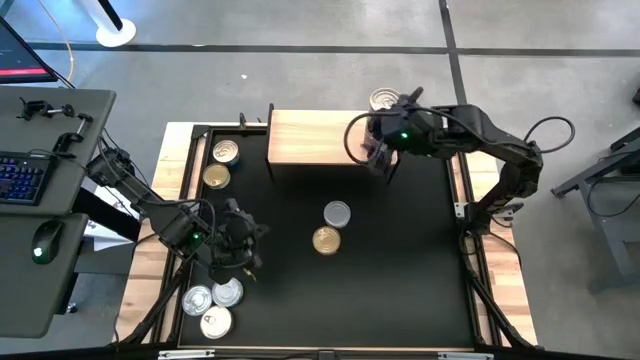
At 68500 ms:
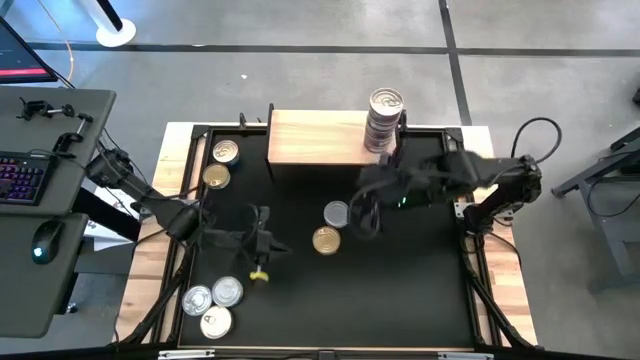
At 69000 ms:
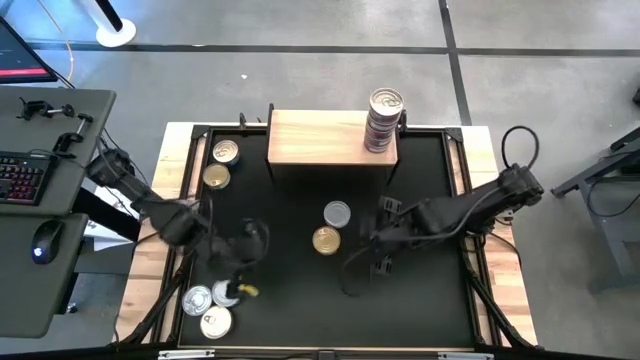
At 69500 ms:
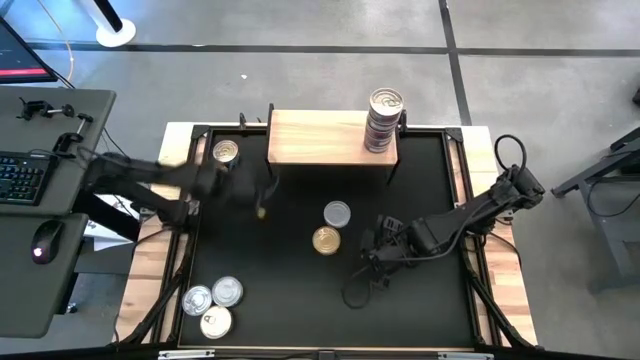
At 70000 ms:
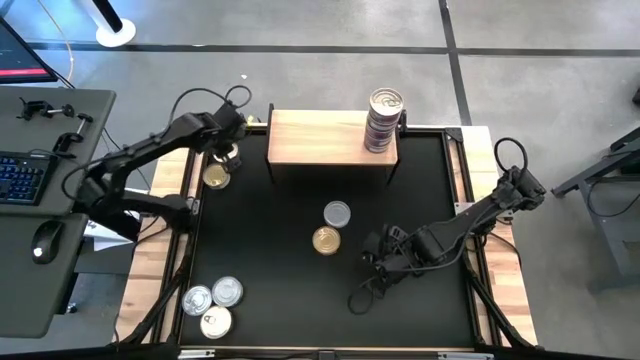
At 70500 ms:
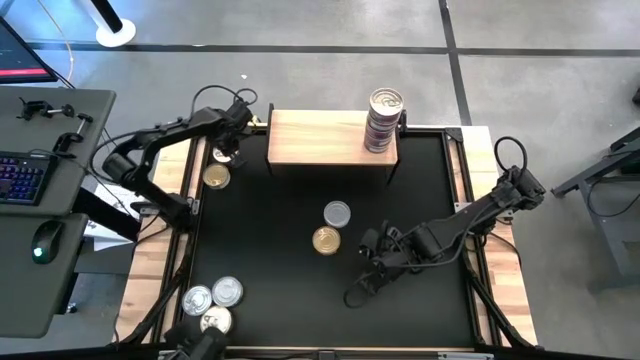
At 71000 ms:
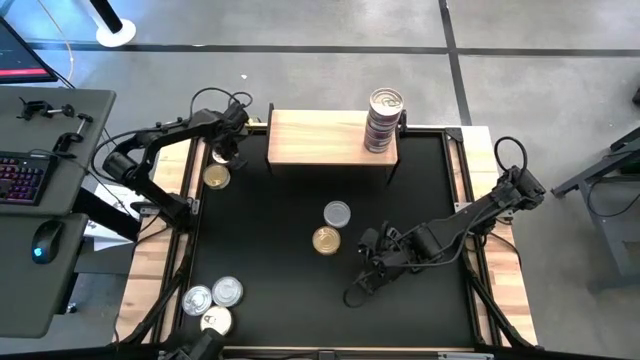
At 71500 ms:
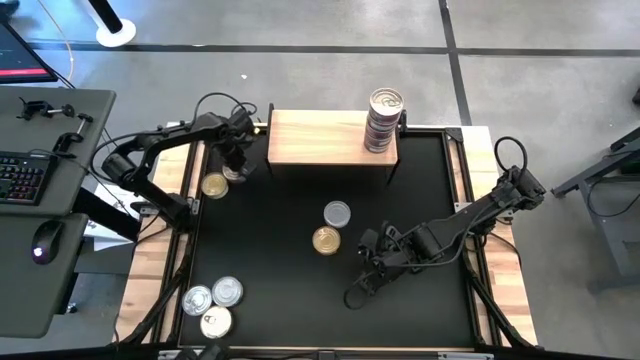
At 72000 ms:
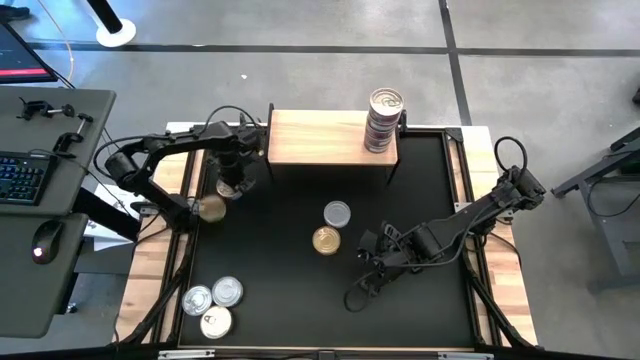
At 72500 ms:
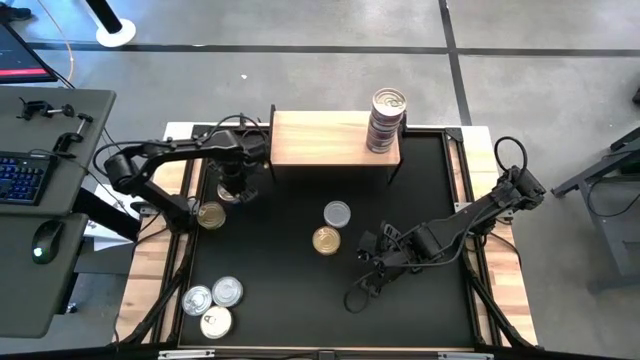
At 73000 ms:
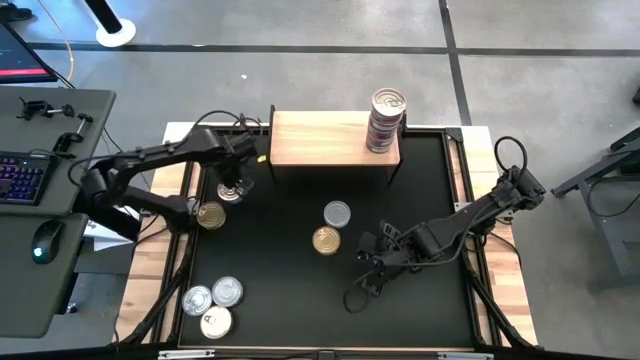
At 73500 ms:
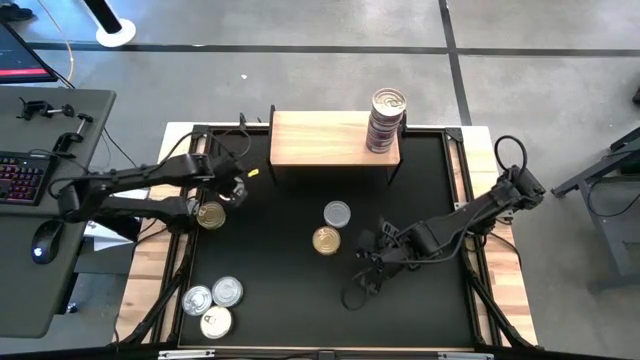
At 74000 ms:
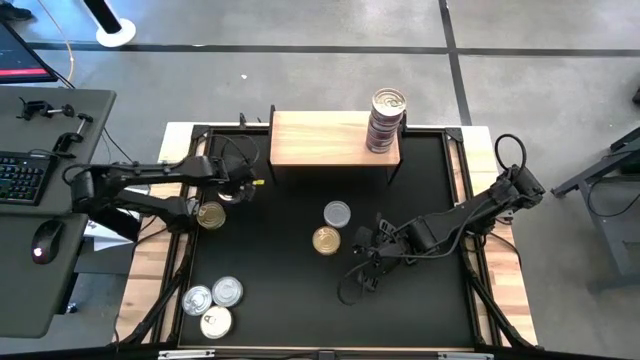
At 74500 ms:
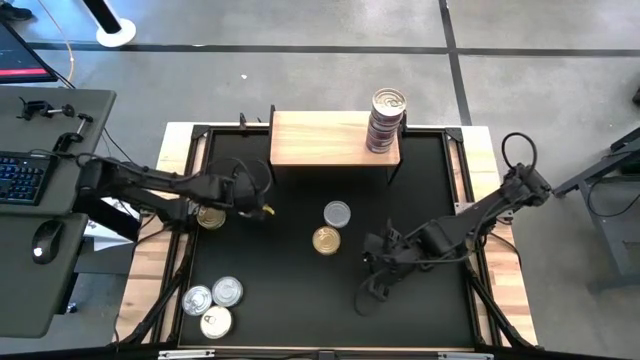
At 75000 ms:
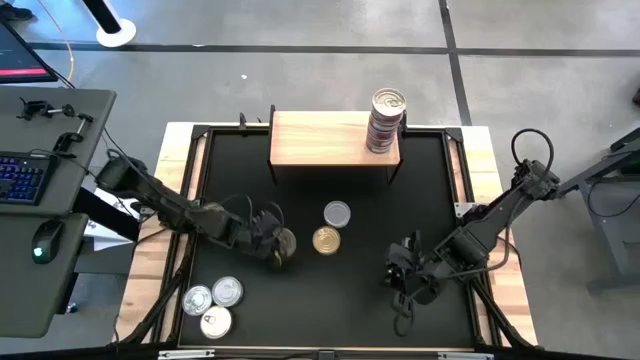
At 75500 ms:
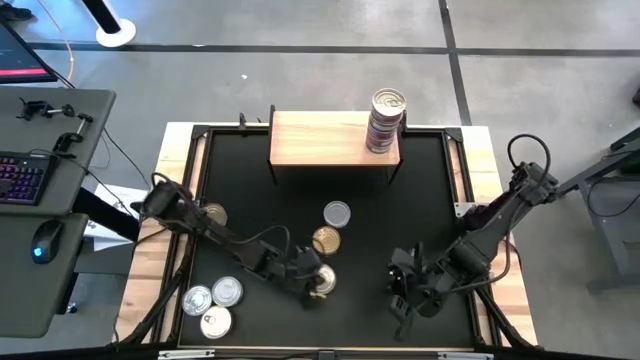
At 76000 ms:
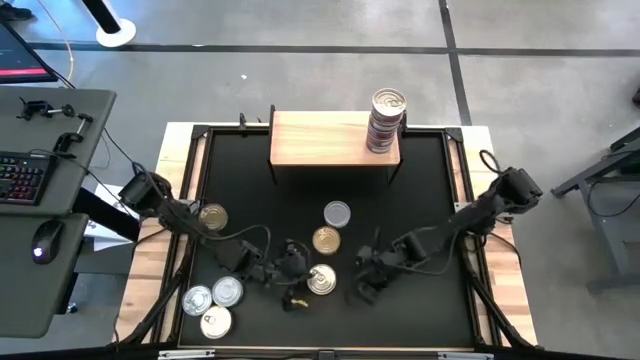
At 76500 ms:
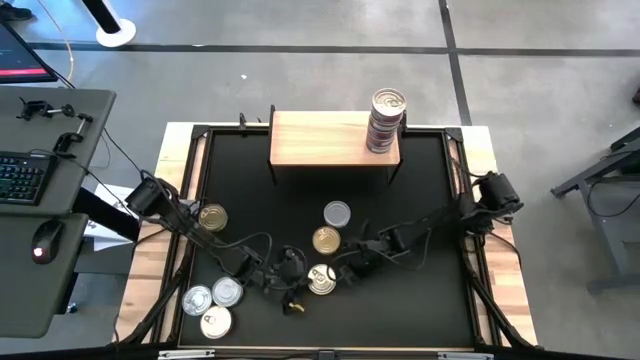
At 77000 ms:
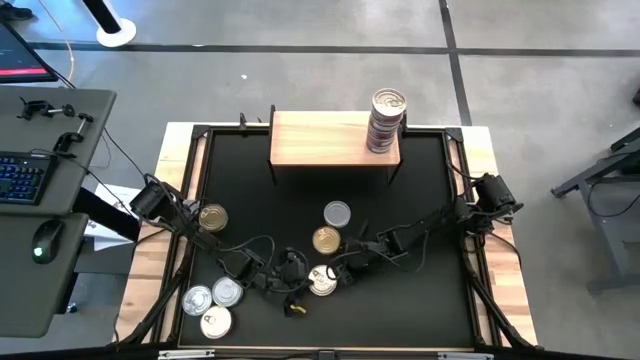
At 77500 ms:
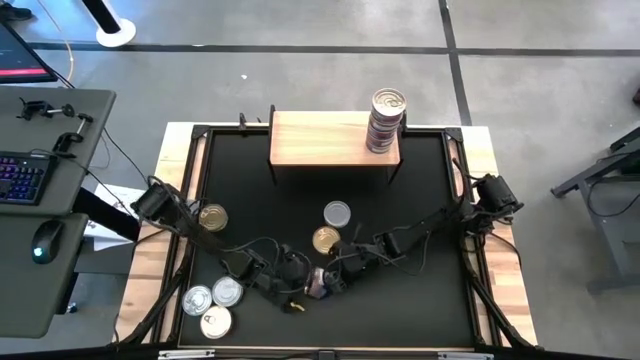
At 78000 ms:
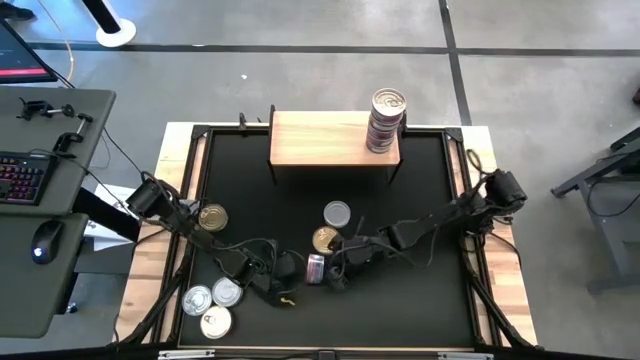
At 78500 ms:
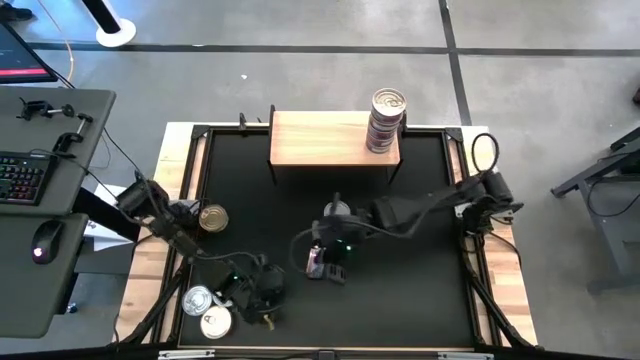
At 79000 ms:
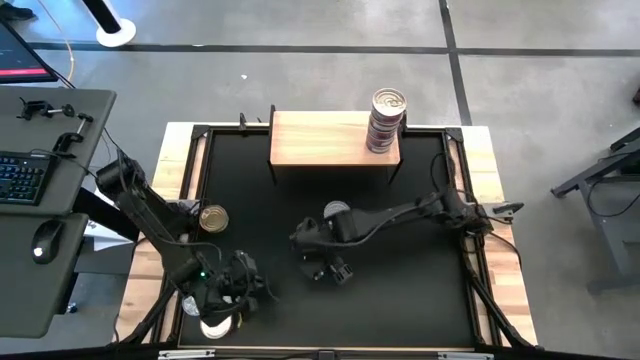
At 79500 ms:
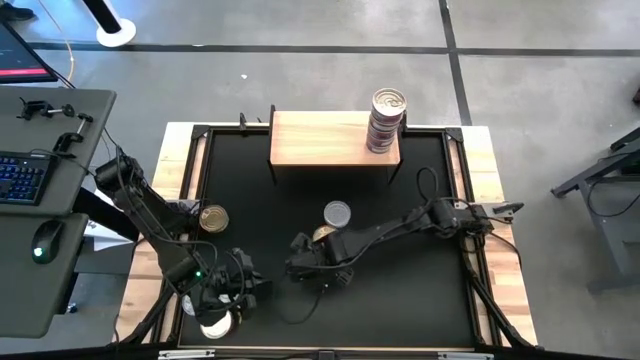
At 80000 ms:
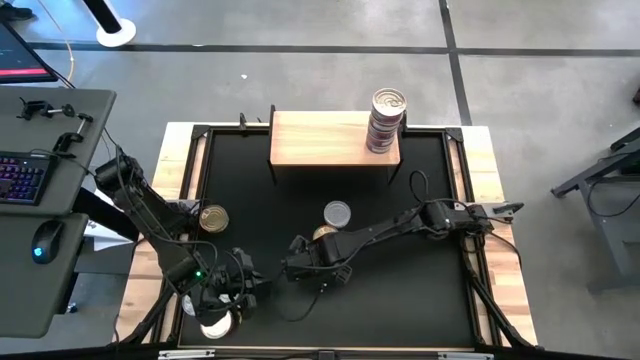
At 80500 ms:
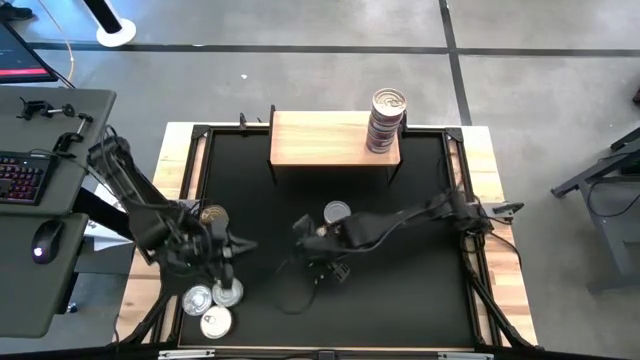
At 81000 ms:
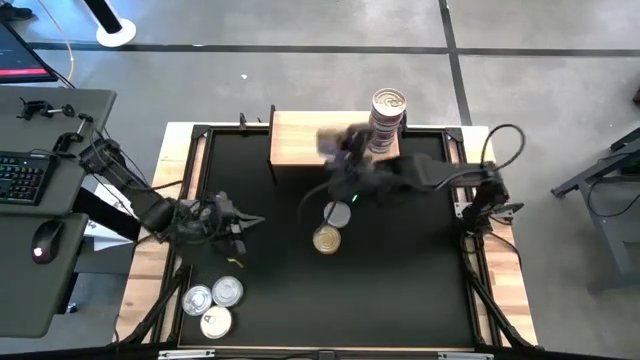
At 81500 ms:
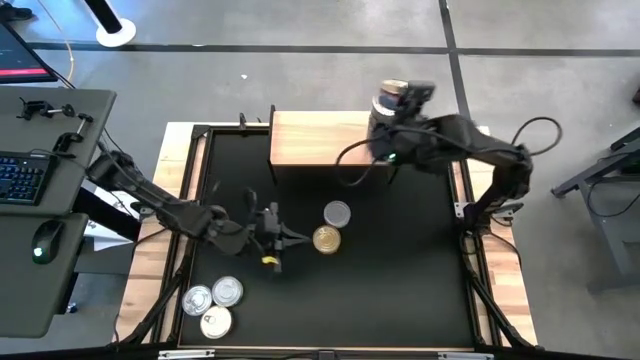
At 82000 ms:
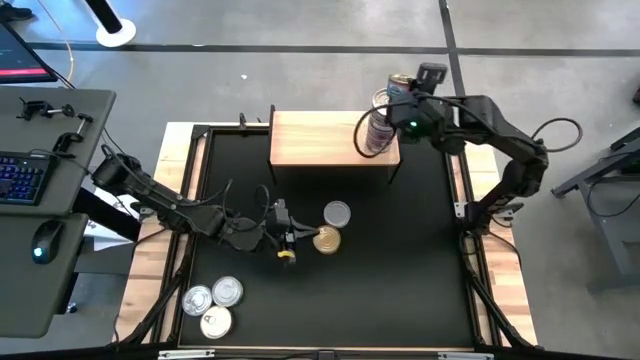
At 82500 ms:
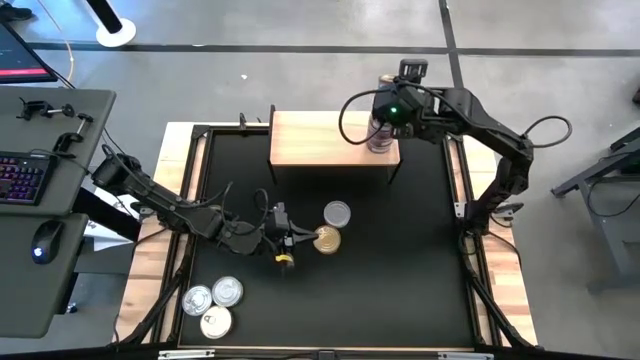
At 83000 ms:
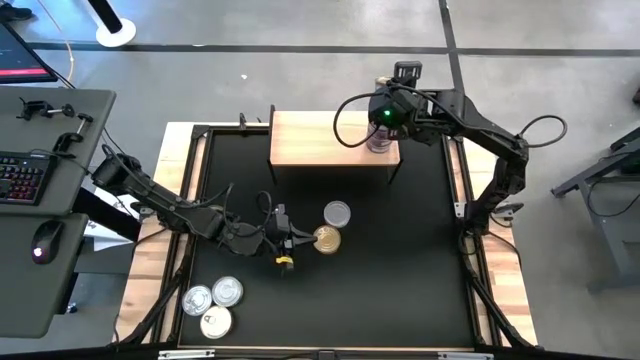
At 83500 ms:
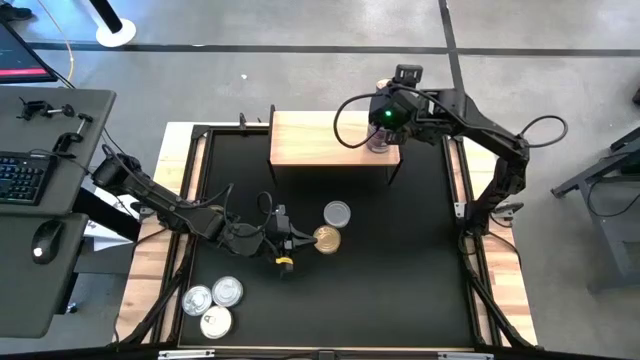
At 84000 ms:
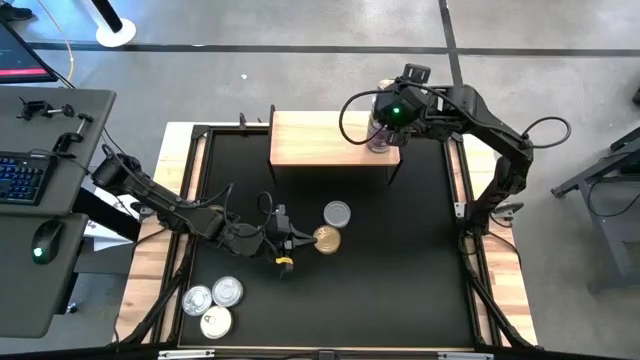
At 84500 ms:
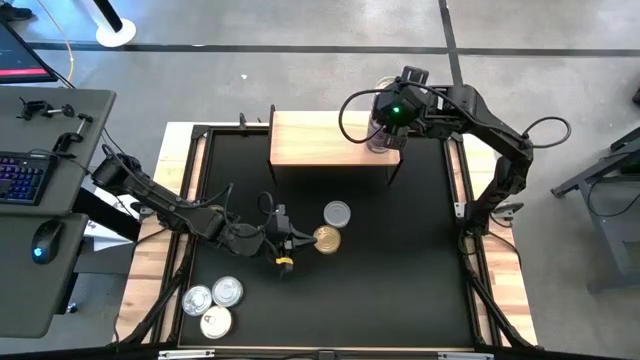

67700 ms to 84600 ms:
Task: Stack canned seafood by type on shelf
Stack the blue tuna can on top of the blue tuna can

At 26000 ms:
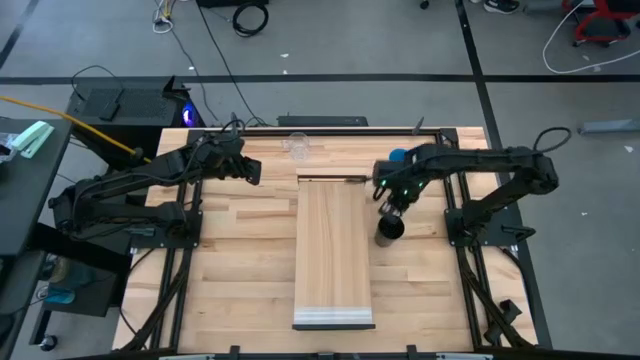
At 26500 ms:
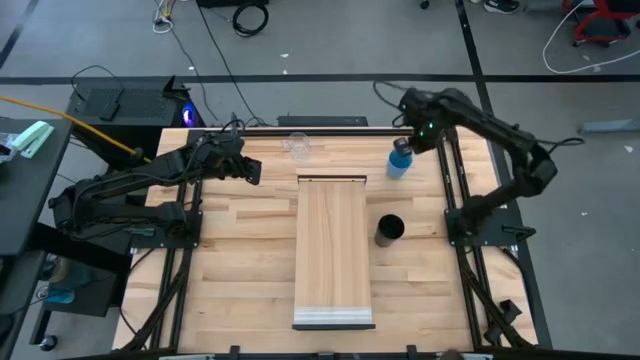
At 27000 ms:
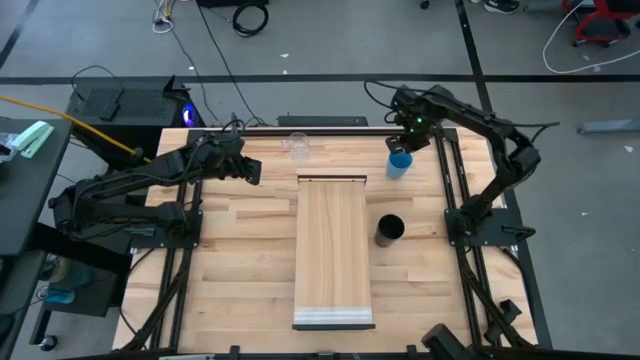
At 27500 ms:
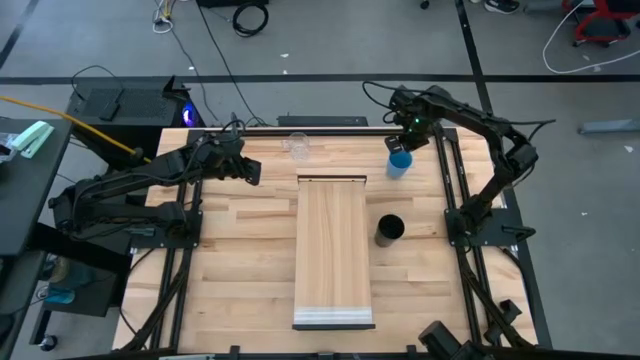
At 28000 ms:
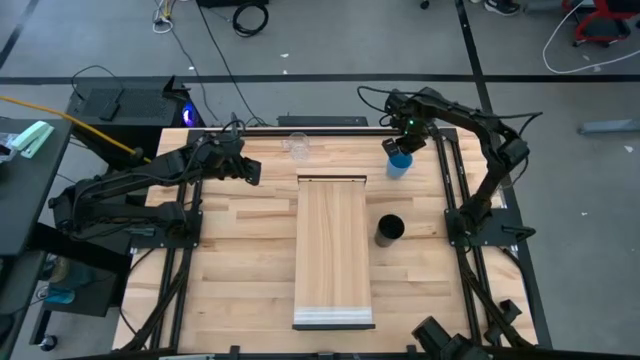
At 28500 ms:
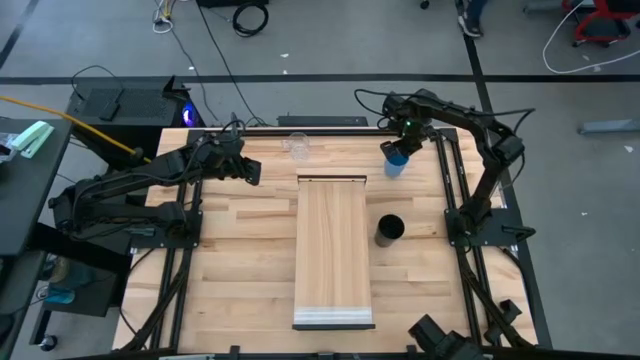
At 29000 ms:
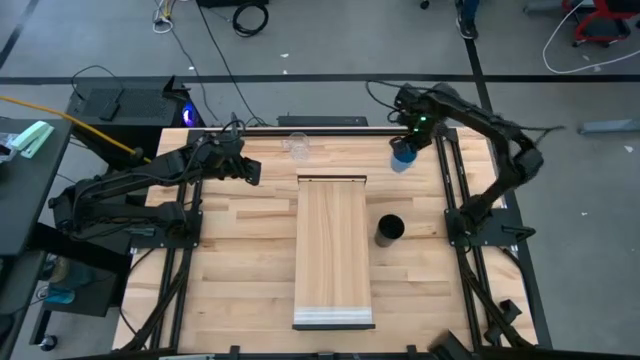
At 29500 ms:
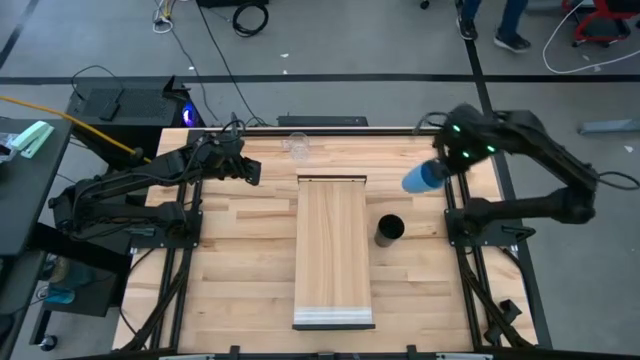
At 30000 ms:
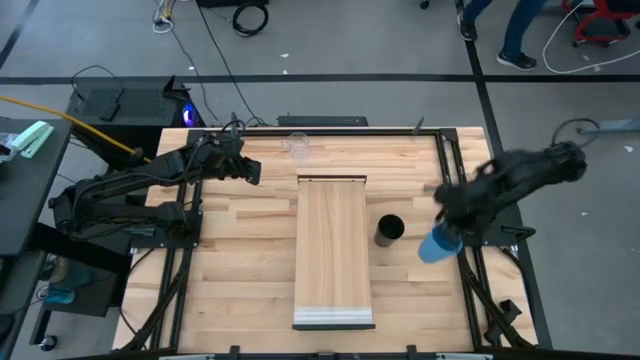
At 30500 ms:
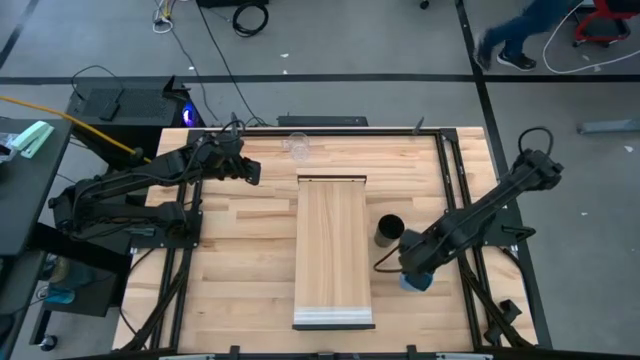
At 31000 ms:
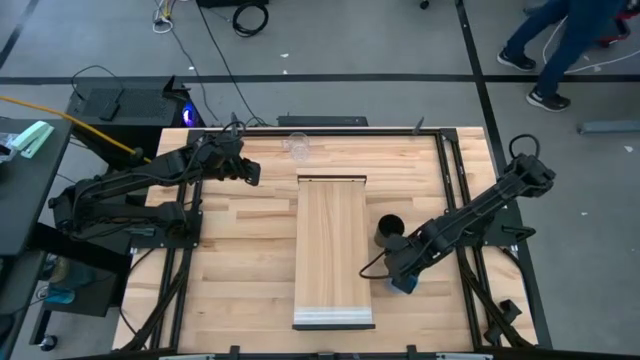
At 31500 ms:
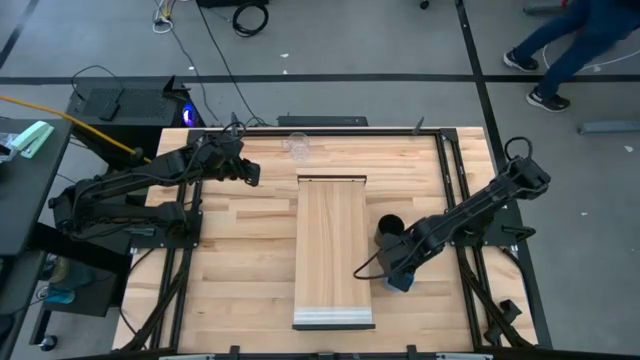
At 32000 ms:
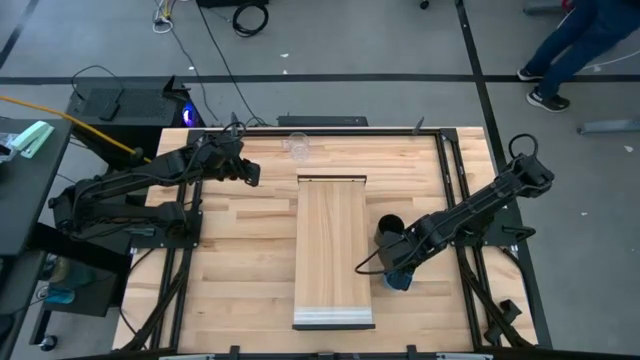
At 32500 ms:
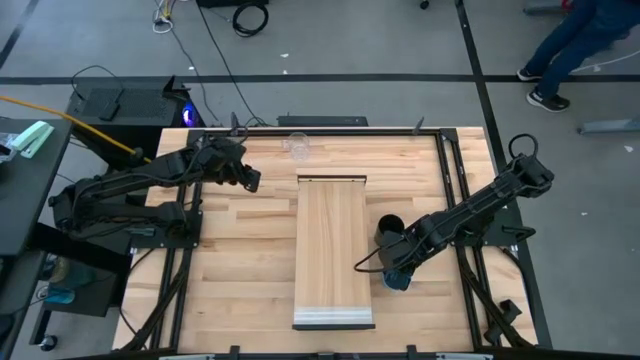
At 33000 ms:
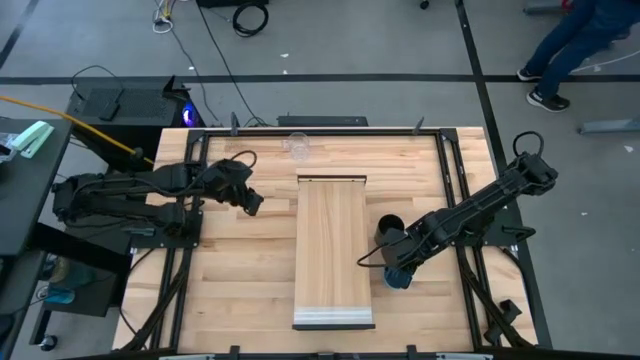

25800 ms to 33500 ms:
Task: Stack small to large cups/mugs on shelf
Move the blue cup to the right of the shelf
